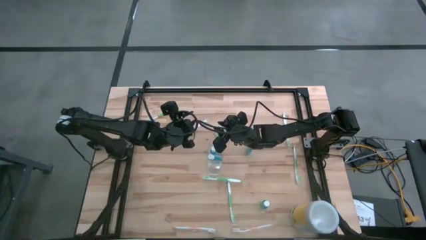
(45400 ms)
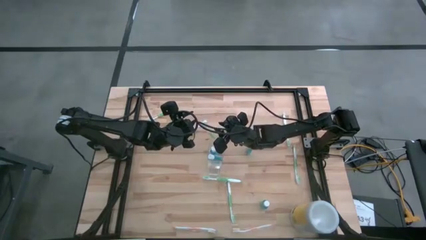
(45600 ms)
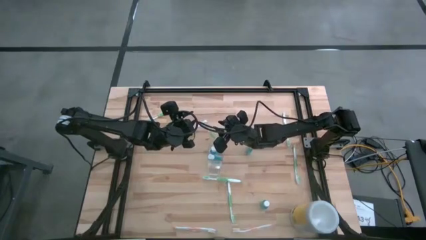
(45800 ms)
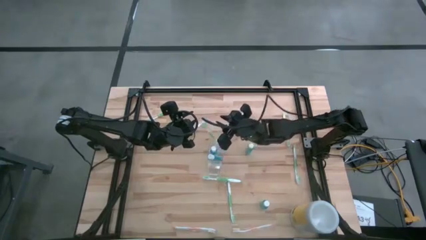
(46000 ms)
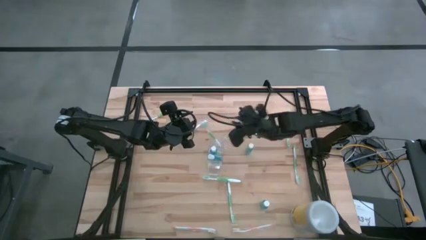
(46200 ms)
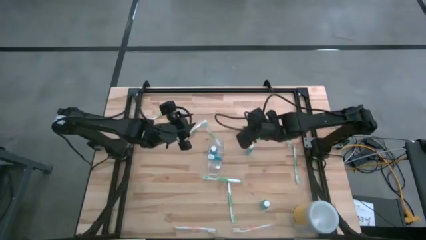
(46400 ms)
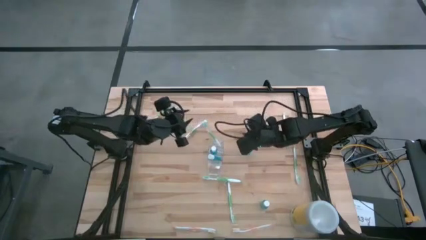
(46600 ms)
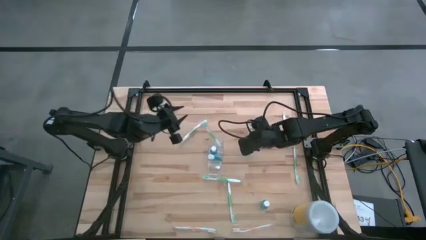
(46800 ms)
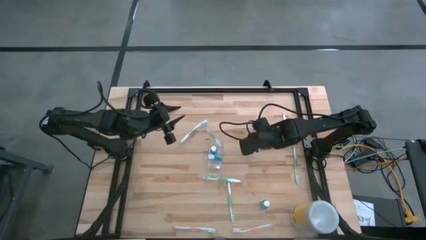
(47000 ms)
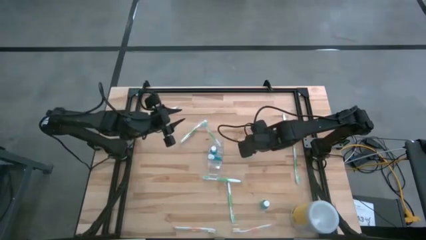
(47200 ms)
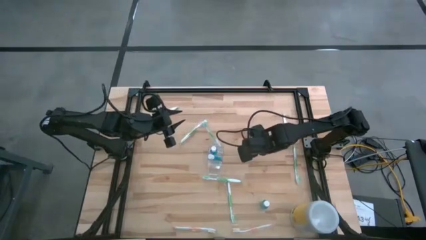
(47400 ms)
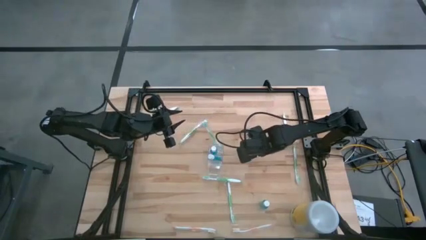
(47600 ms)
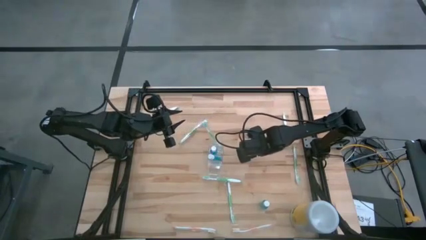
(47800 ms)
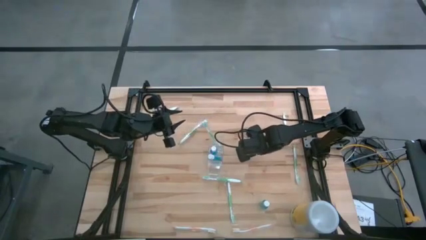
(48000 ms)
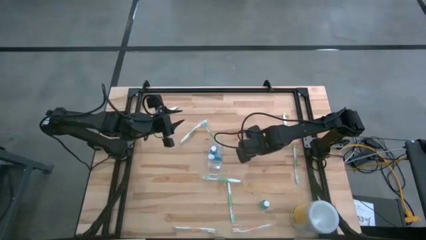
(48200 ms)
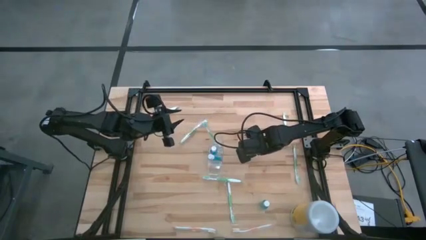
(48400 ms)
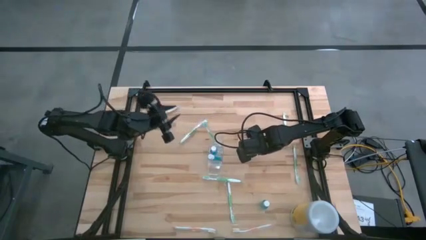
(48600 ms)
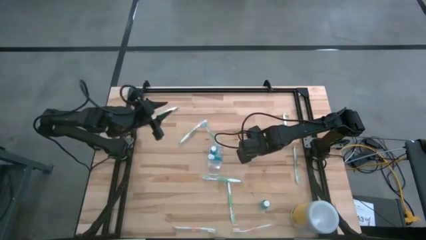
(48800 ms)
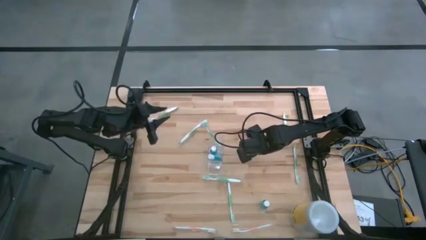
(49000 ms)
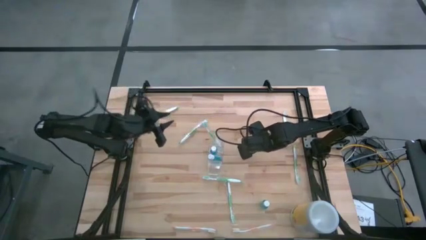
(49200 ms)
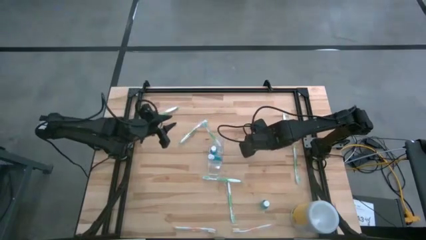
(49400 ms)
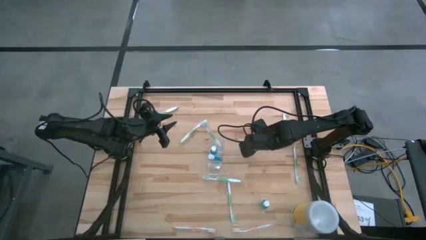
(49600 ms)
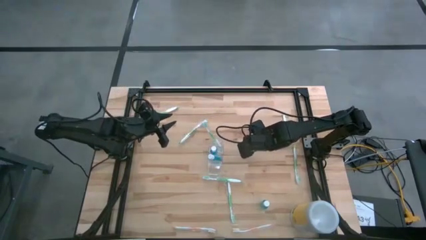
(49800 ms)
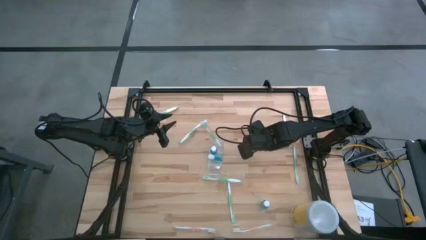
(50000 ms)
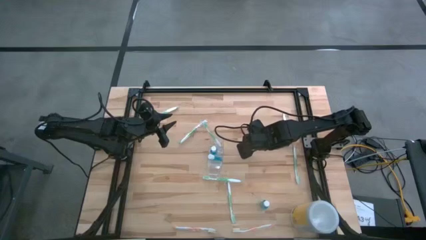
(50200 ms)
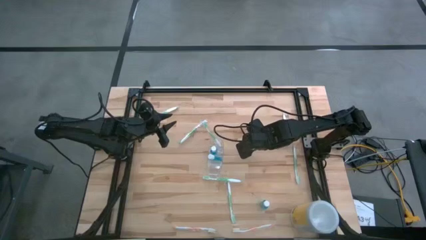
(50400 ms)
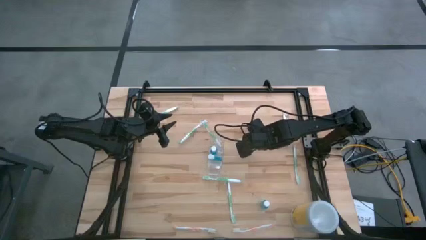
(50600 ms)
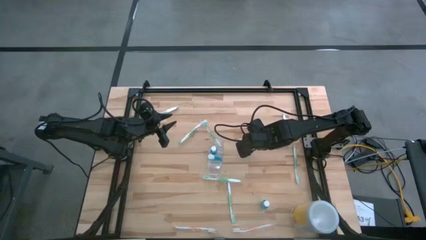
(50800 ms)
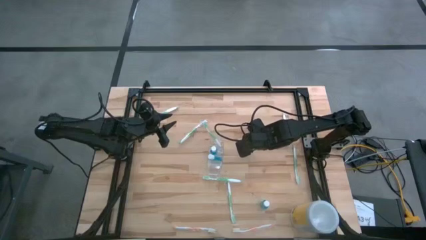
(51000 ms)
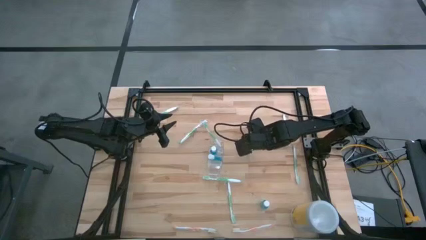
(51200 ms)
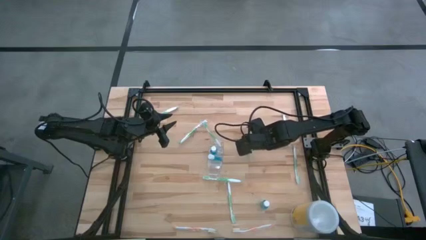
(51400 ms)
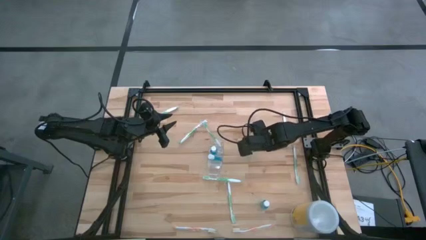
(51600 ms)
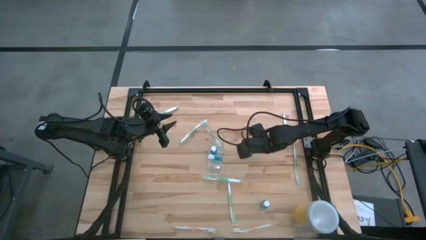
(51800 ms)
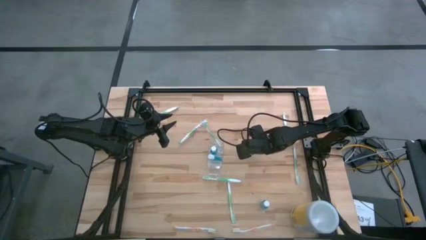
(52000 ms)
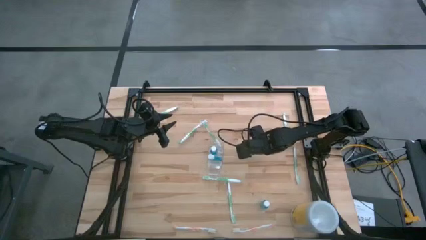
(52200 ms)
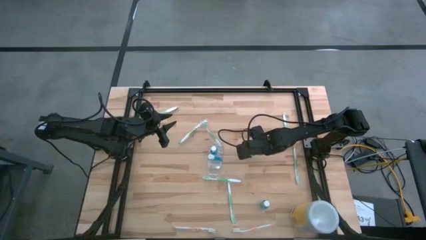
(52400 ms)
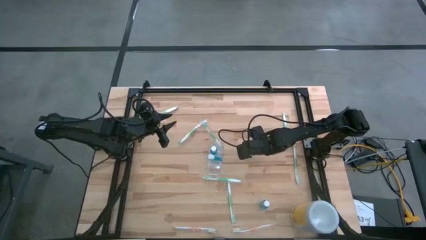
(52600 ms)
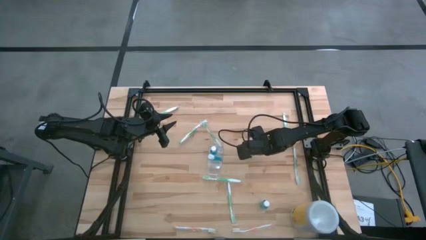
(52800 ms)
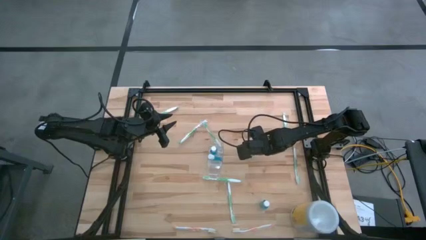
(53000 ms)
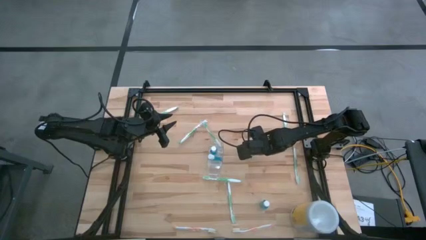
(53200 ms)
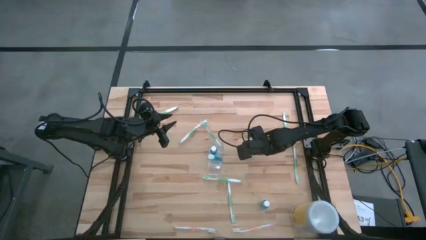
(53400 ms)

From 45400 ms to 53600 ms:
Task: Pick & Place toothbrushing station
Put the blue mouthwash bottle into the middle of the transparent organizer

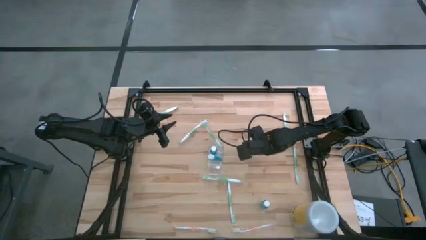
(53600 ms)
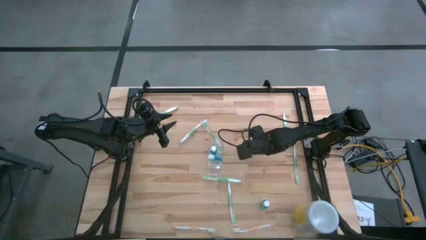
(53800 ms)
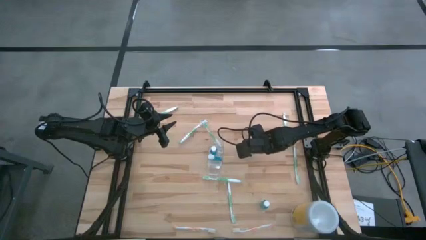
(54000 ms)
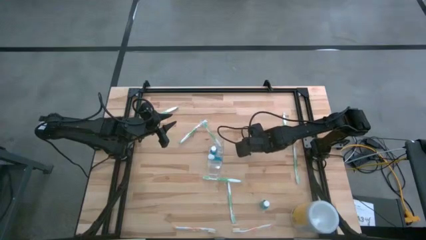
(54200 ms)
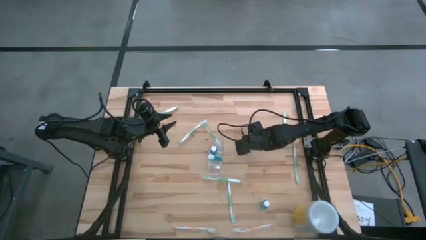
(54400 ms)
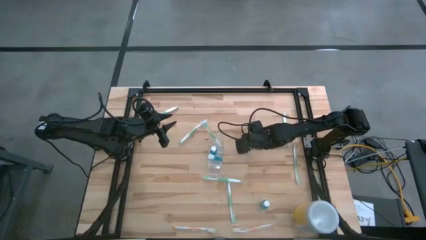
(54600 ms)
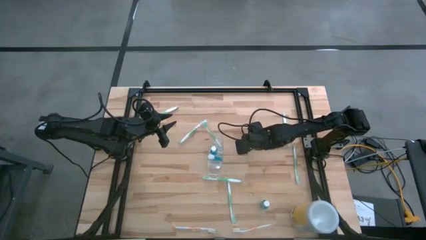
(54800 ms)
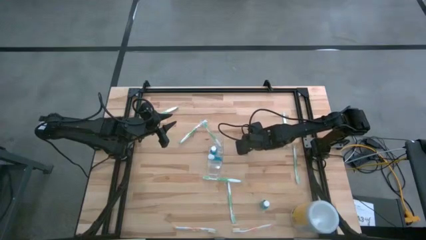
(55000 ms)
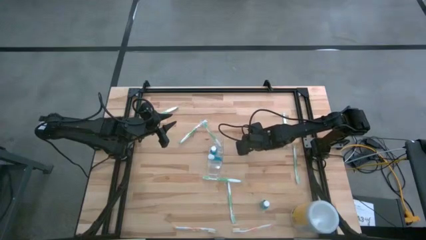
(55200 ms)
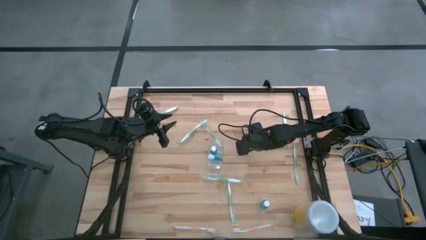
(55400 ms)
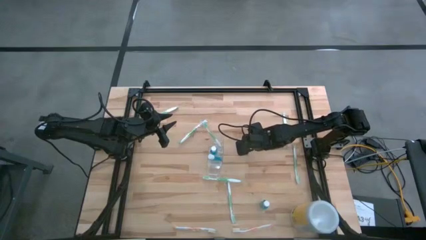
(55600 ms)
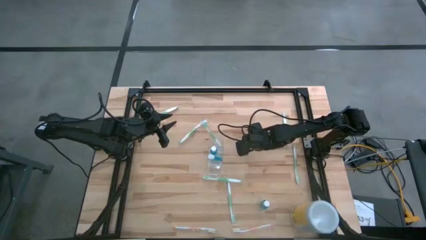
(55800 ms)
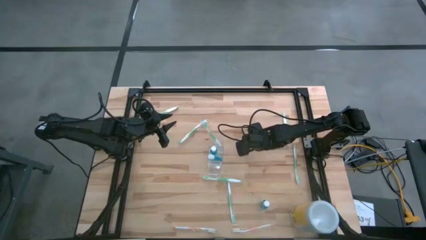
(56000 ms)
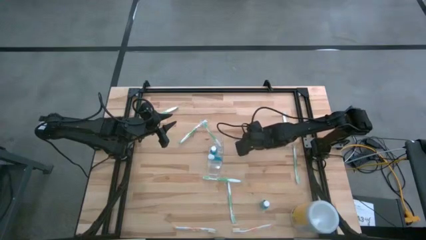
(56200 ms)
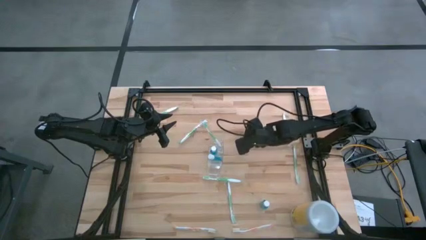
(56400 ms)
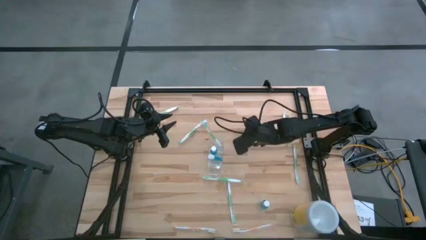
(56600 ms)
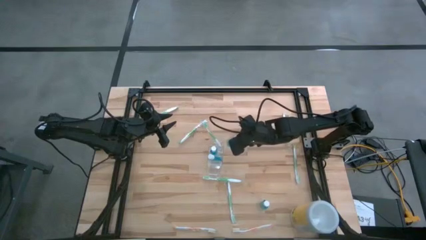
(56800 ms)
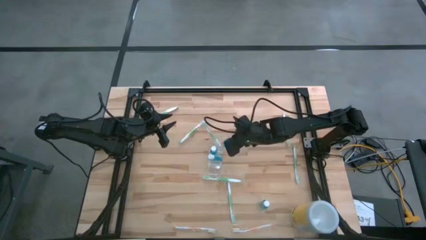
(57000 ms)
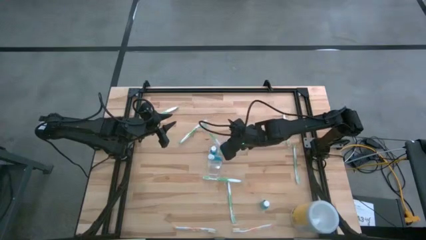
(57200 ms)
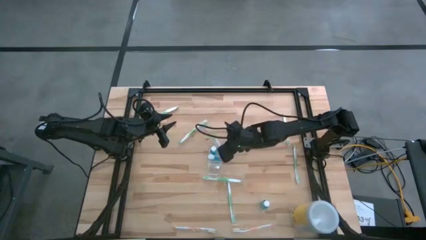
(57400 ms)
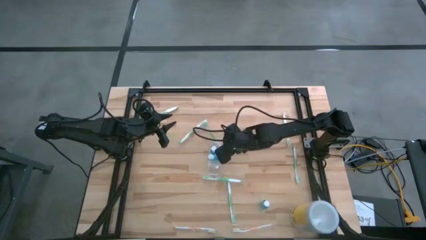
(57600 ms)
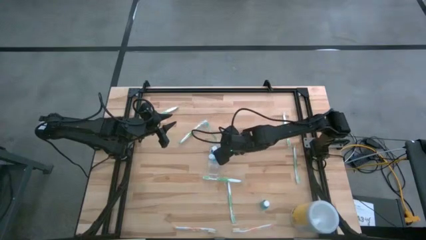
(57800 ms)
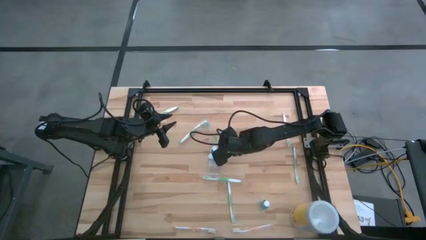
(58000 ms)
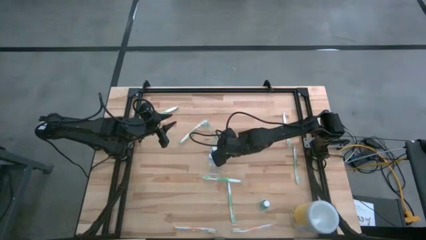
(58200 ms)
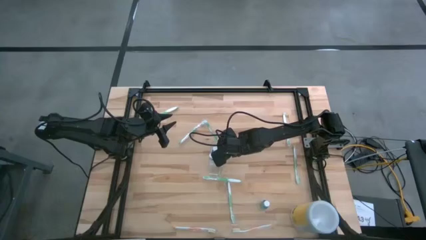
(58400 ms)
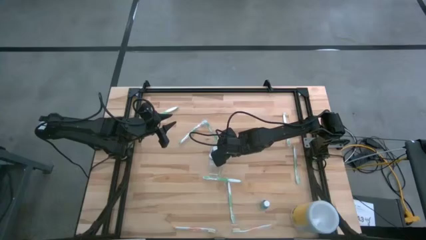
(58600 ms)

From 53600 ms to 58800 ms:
Put the blue mouthwash bottle into the middle of the transparent organizer

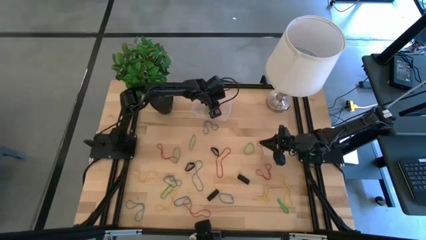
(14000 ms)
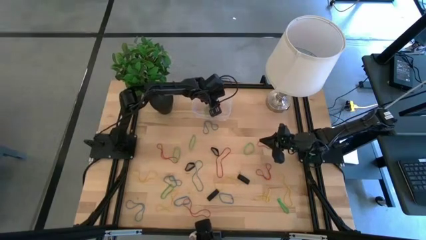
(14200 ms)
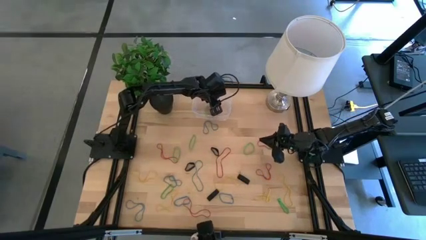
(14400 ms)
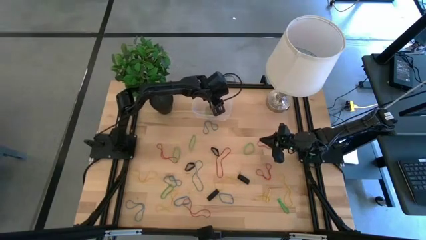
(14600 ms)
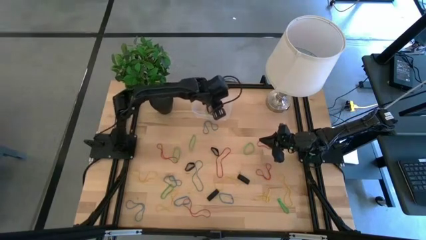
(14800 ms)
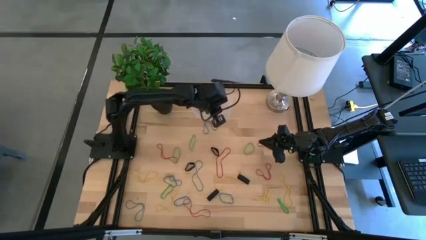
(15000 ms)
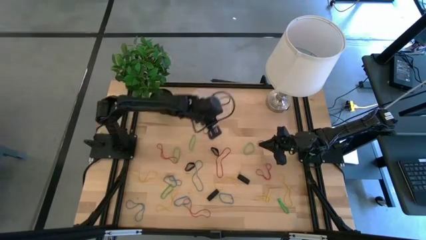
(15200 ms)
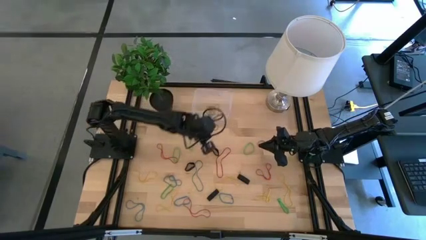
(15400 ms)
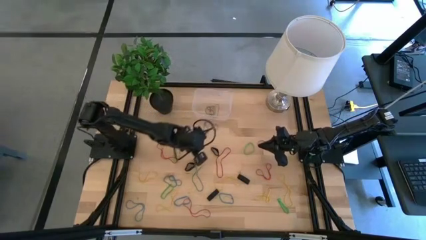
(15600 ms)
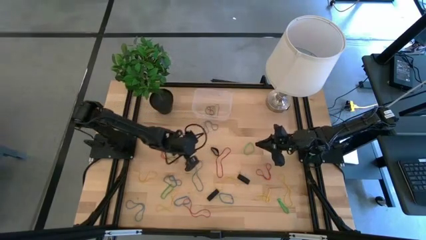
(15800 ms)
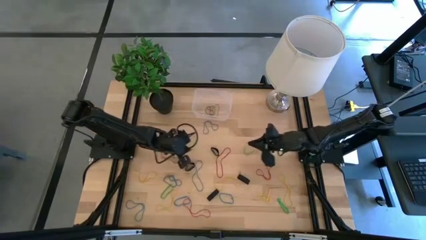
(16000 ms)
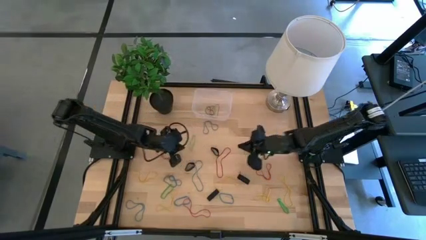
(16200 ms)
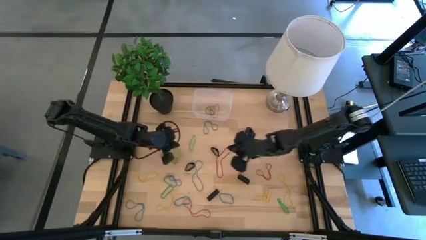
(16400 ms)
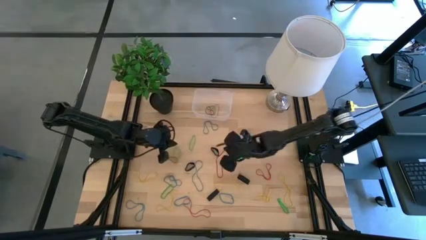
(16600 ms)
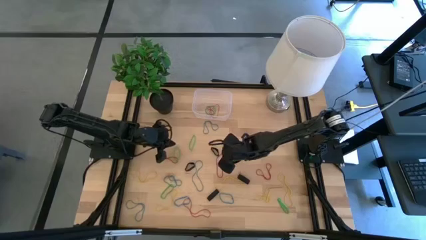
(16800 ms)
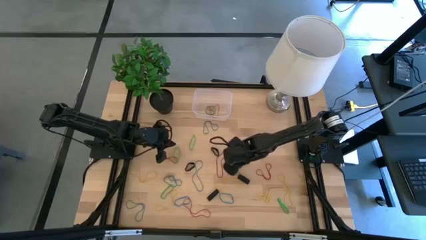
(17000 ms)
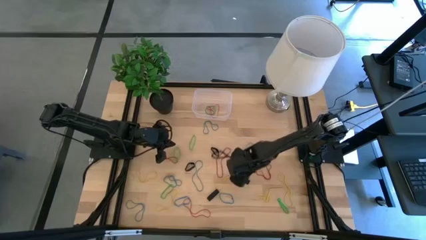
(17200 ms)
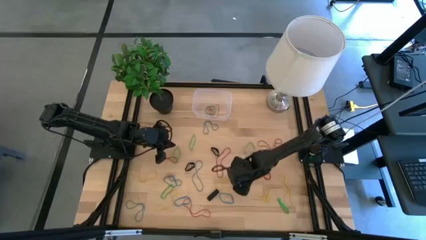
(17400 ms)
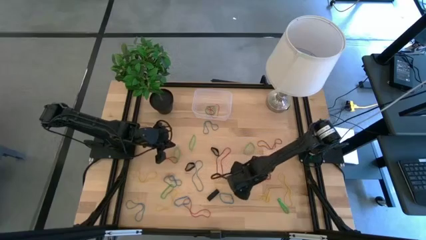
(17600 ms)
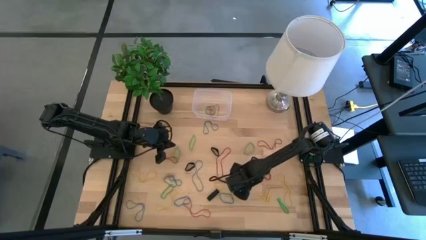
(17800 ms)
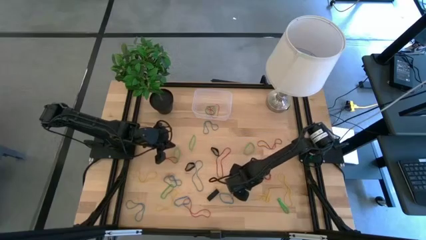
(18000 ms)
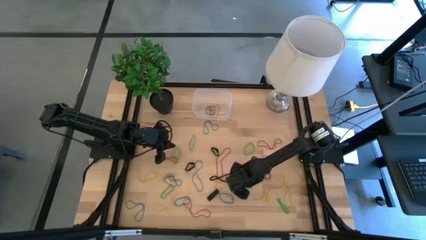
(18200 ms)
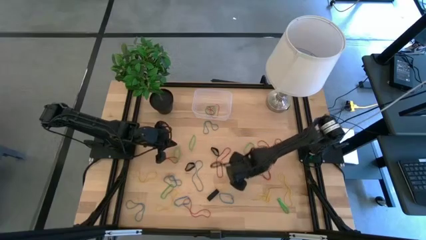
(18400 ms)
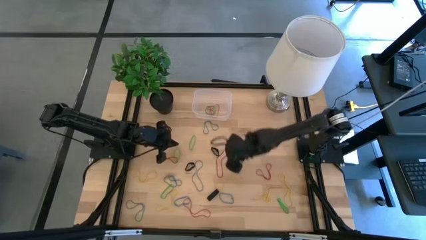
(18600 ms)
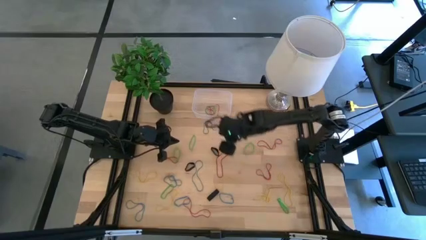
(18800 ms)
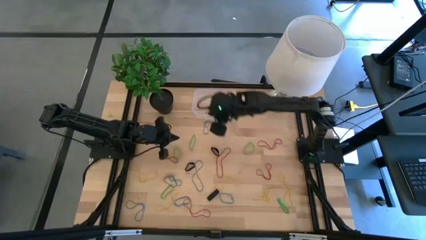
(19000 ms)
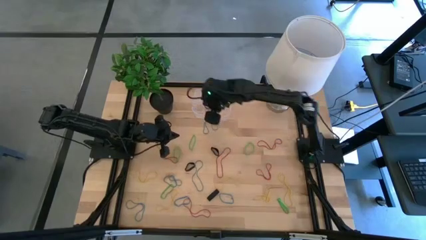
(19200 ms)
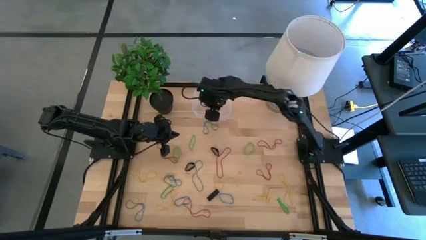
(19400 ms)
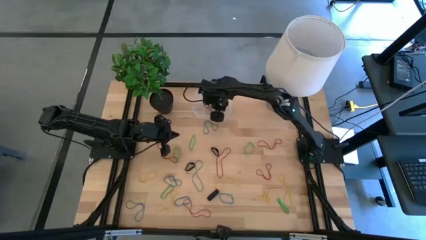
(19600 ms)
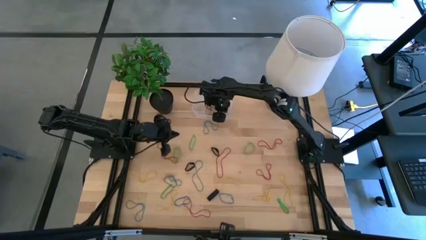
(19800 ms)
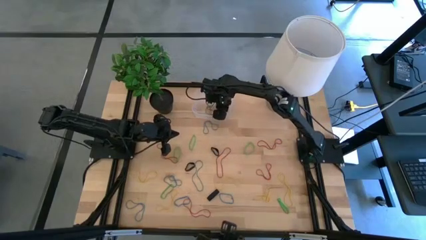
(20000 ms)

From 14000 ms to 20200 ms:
Task: Pick and place rubber bands into bin
Put the black rubber band into the transparent bin
